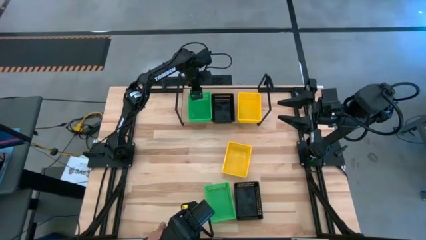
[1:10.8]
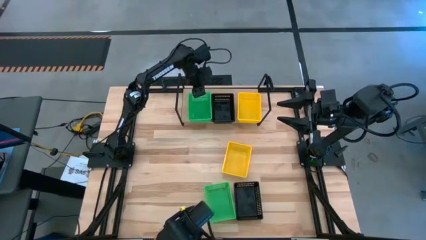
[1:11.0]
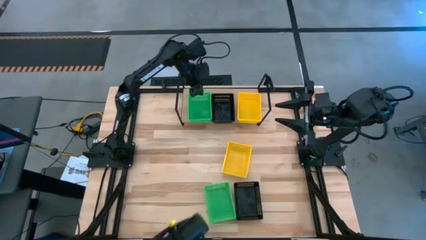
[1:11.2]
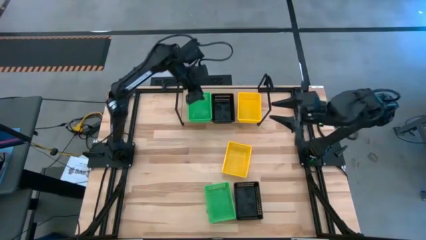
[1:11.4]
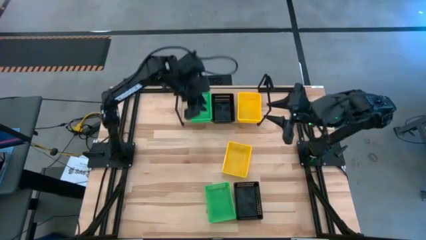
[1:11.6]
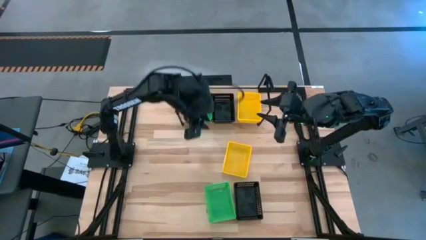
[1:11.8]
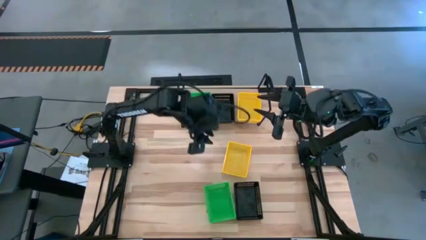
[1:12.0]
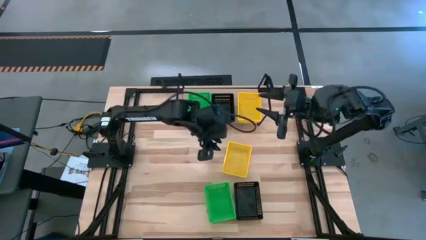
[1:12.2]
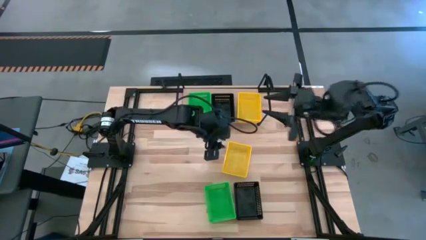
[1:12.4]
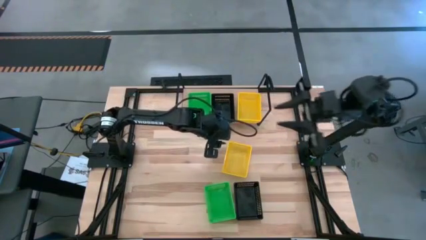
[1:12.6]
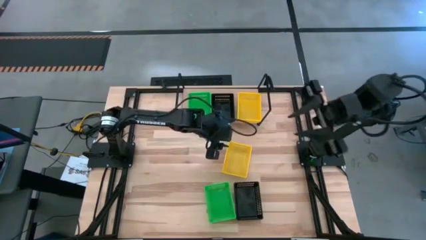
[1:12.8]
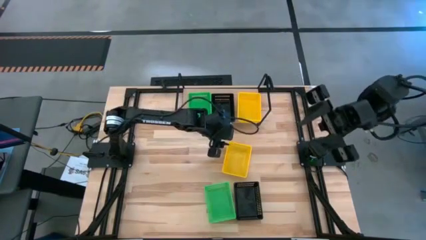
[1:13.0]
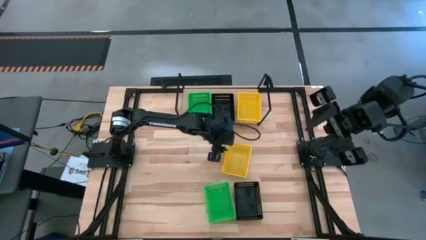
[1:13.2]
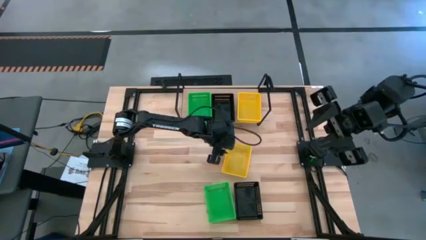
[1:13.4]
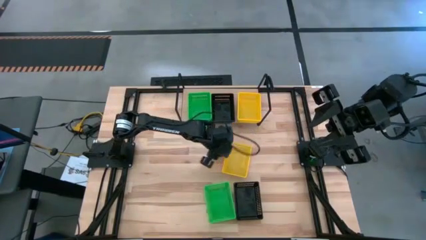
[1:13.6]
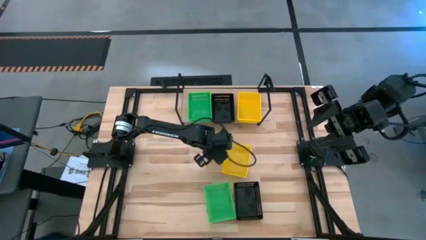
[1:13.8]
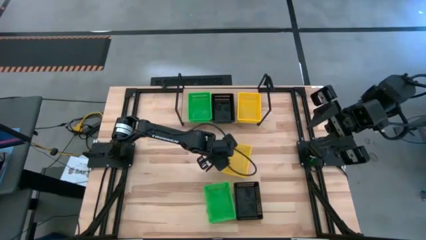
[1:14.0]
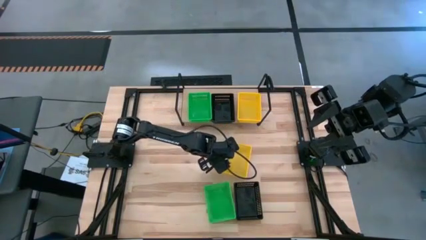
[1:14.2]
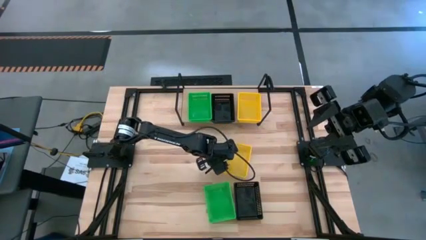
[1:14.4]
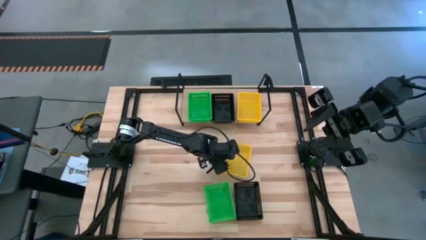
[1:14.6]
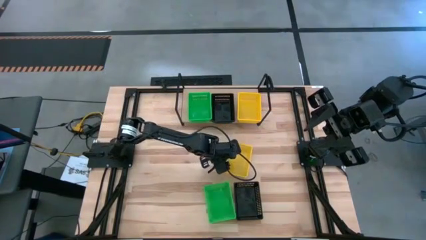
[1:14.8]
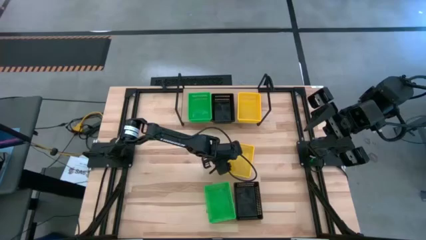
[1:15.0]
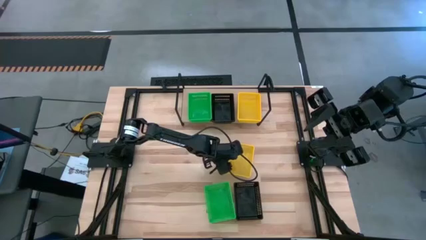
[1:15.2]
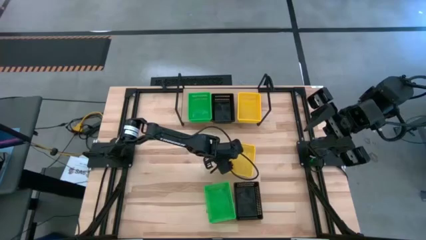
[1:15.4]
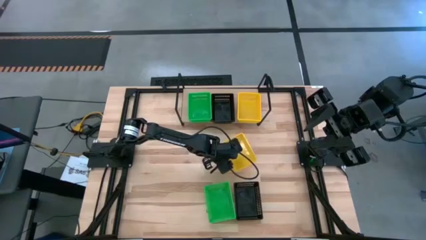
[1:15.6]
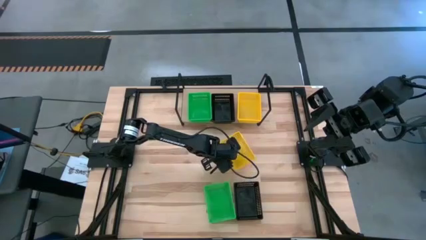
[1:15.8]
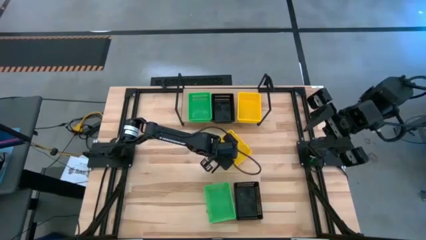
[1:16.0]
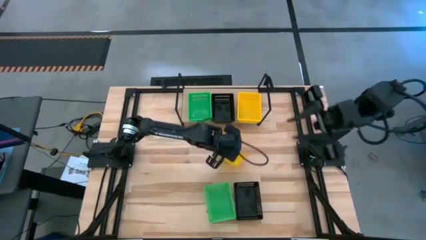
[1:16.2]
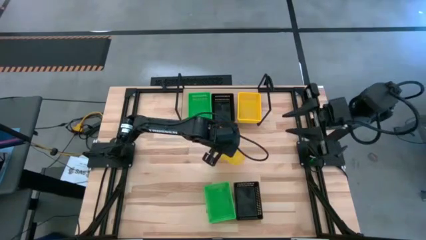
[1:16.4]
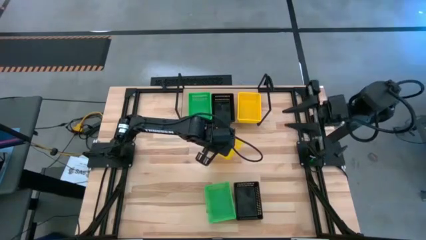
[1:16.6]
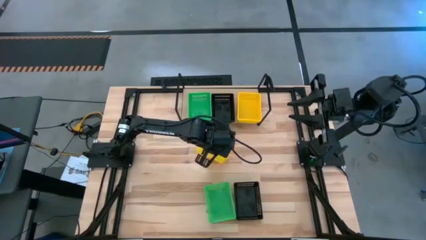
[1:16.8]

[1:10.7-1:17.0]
Task: Stack baskets on shelf by color
Stack the yellow bin on top of the yellow bin

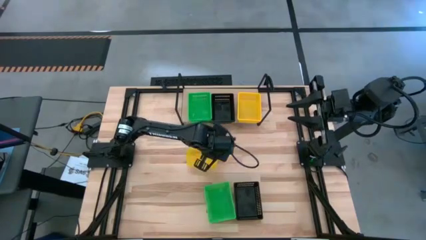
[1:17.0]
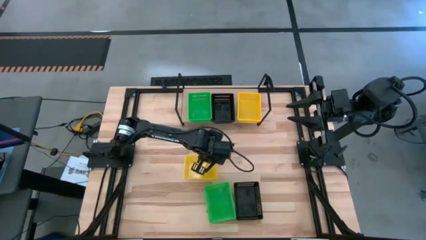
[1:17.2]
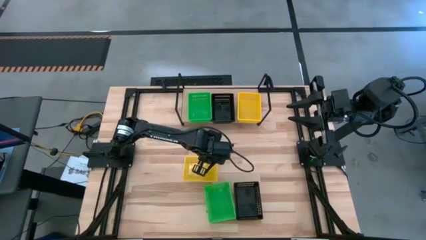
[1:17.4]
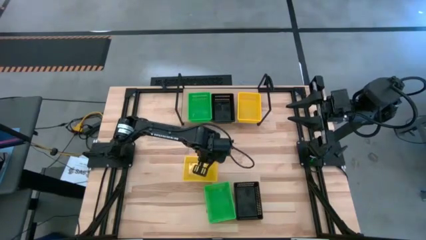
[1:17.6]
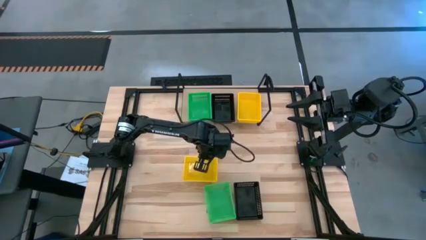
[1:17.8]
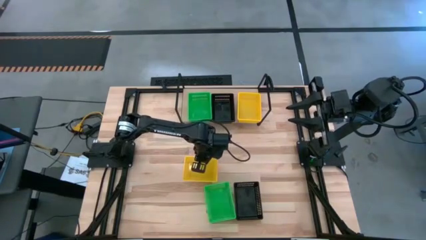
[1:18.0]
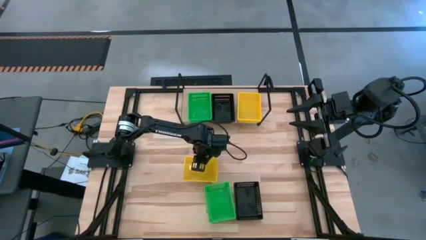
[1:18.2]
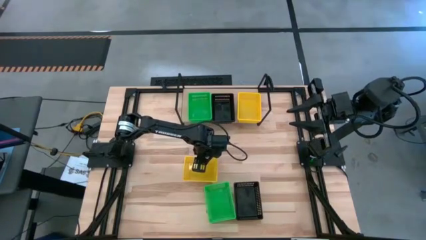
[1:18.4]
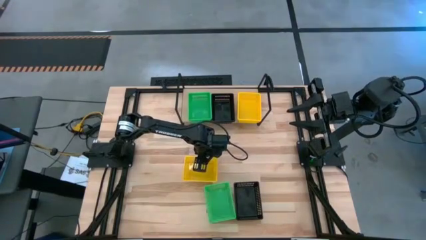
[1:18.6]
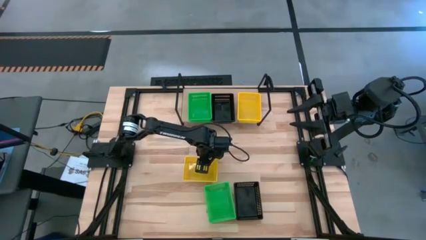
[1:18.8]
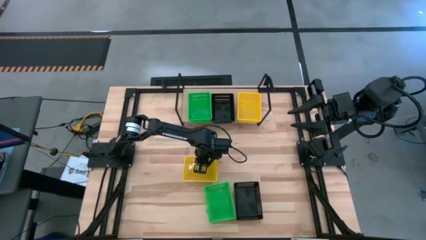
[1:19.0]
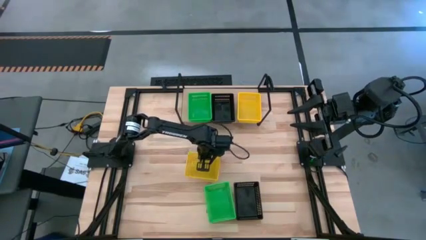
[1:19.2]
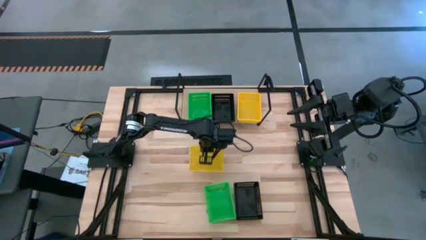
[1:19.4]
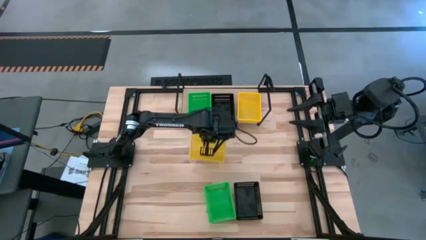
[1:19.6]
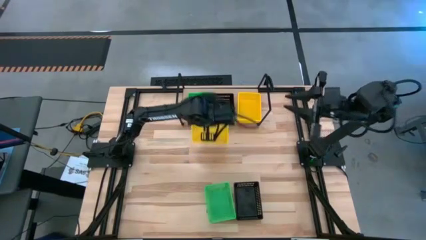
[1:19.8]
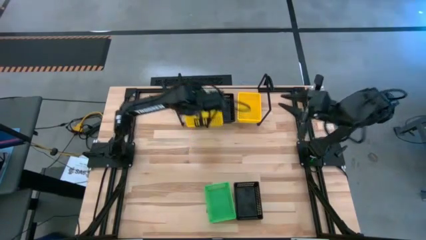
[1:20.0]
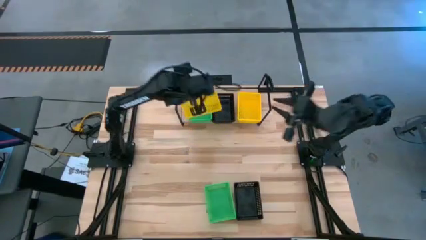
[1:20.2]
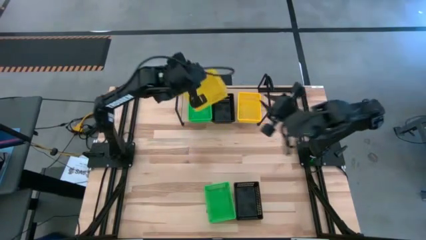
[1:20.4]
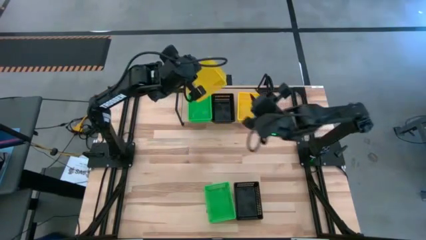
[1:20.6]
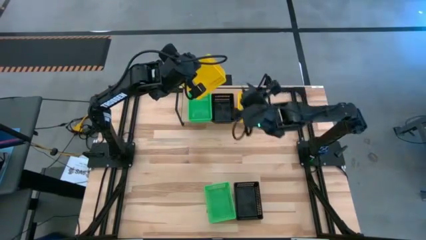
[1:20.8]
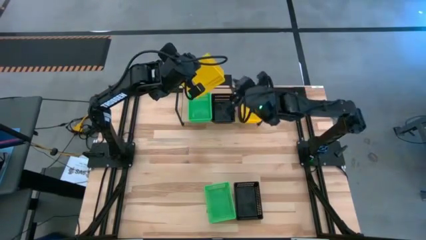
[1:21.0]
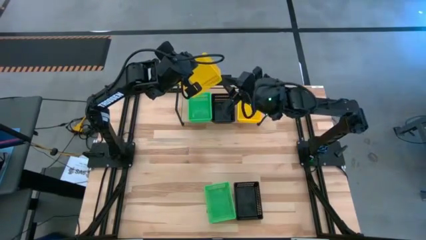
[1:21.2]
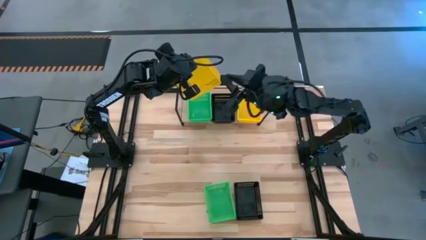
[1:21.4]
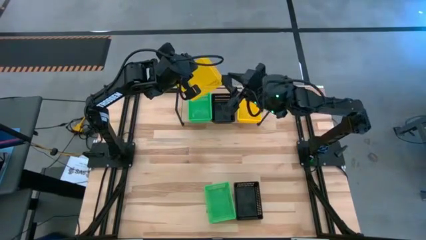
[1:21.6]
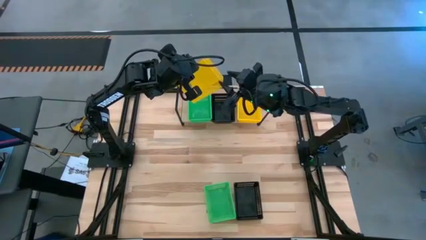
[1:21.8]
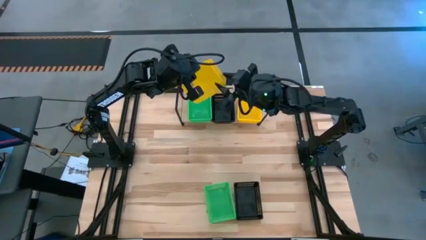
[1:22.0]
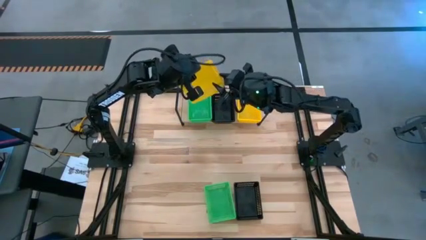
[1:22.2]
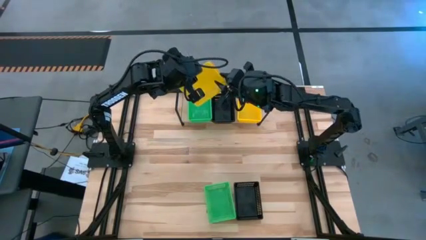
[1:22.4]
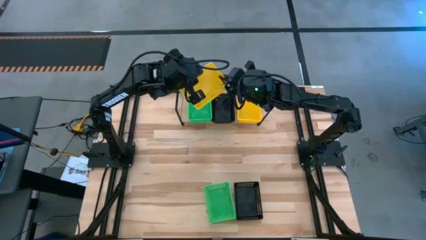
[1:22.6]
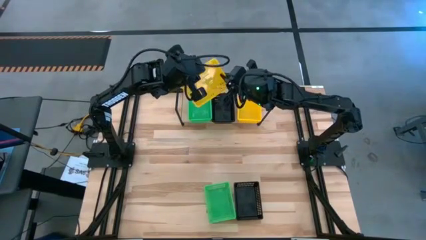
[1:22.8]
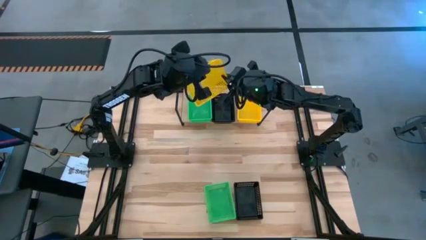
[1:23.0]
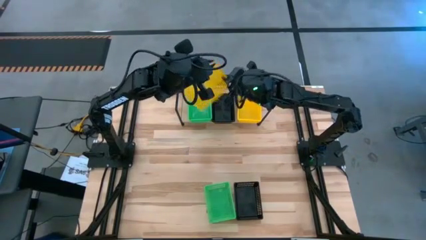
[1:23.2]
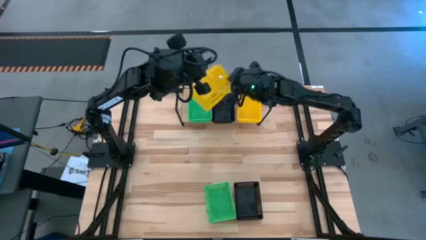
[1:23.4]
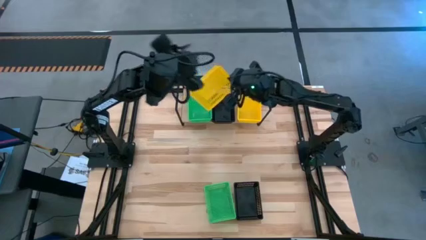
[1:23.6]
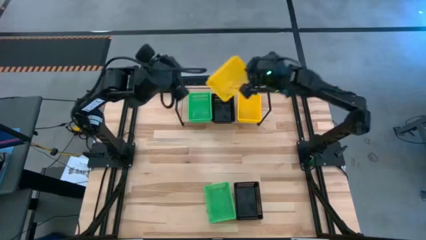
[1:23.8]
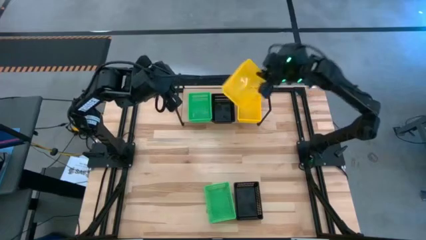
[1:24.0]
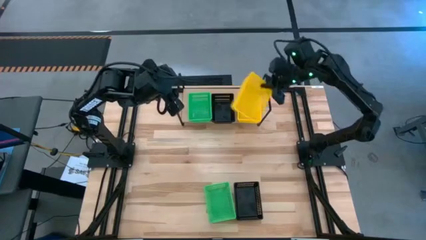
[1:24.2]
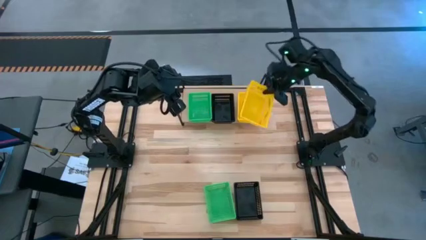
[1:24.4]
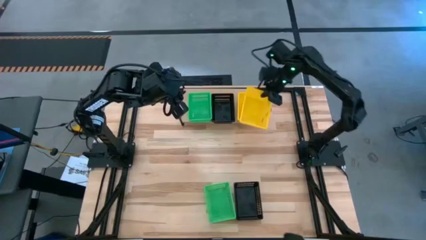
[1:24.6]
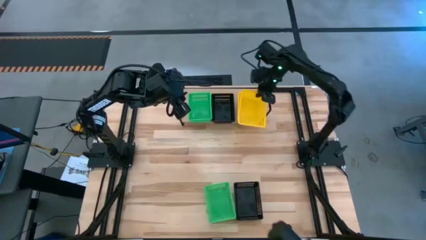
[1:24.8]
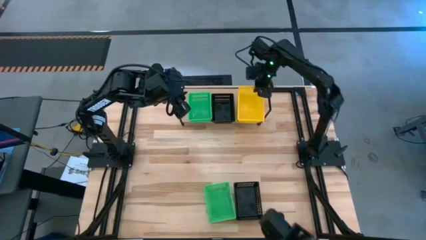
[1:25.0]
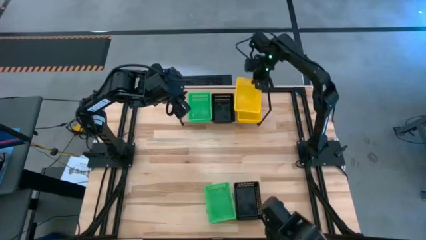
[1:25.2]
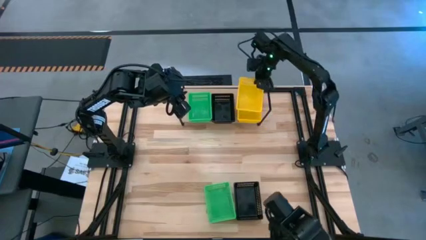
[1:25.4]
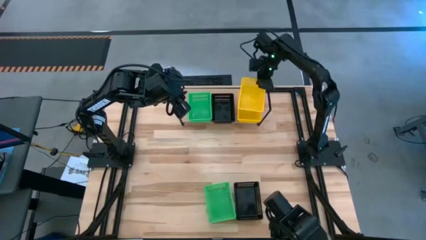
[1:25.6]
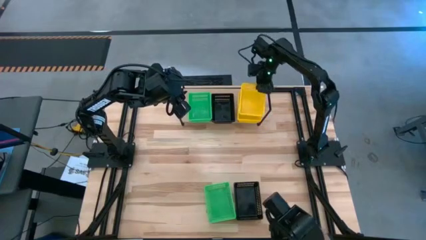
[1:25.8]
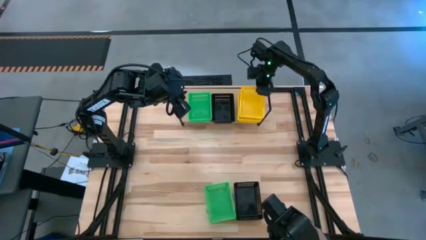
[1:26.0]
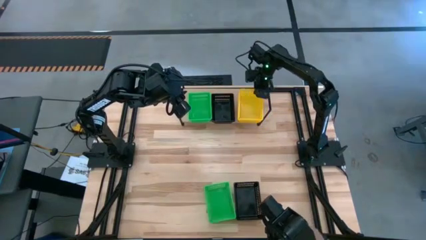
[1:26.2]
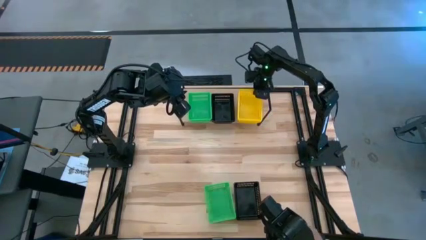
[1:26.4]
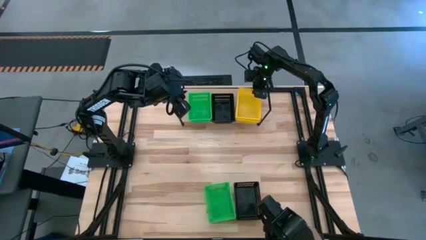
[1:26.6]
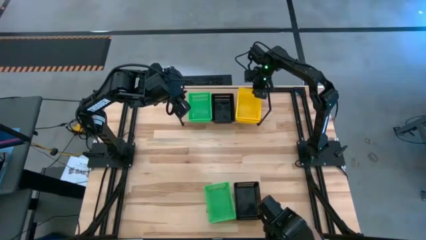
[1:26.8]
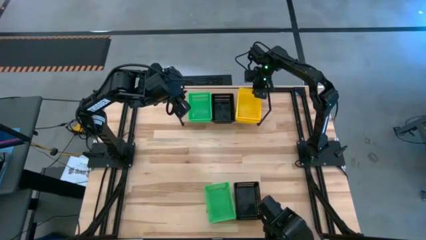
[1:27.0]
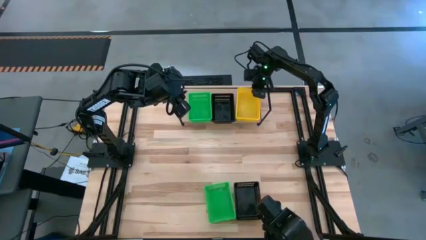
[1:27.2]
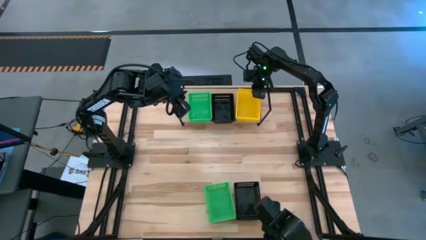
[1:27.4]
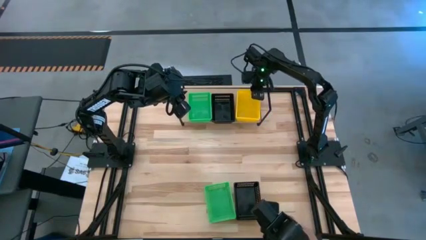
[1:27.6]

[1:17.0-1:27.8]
Stack the yellow bin on top of the yellow bin
